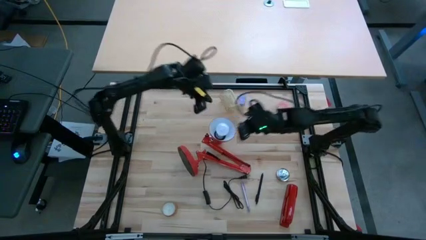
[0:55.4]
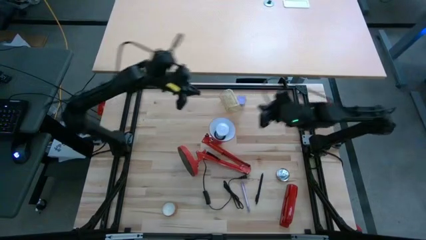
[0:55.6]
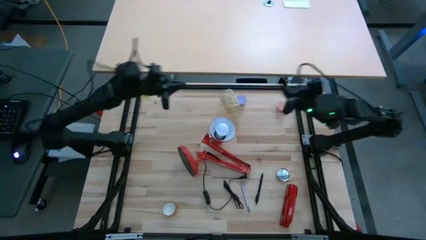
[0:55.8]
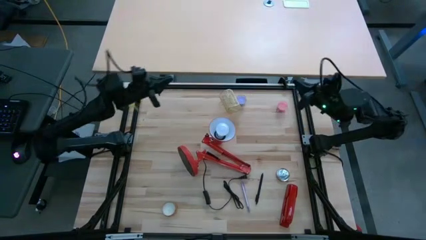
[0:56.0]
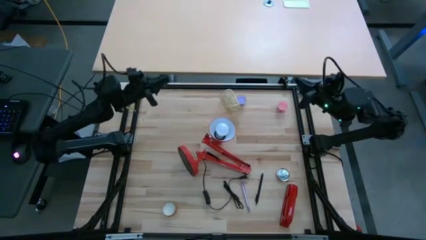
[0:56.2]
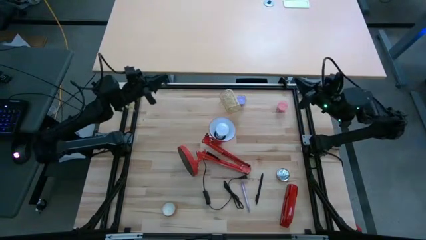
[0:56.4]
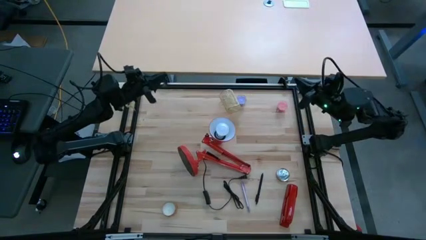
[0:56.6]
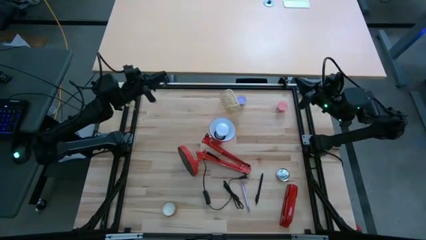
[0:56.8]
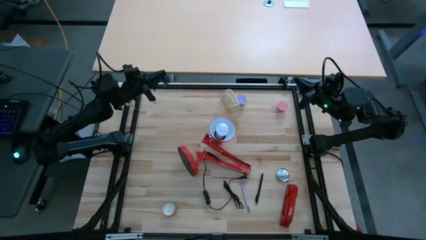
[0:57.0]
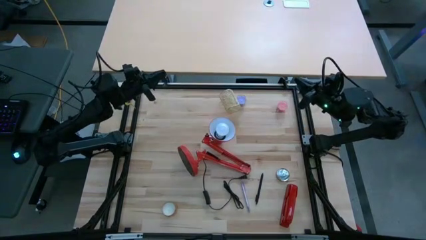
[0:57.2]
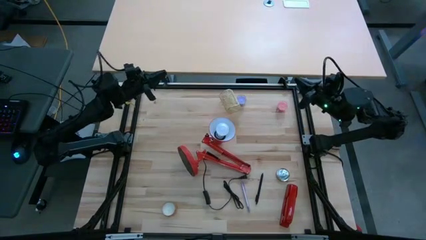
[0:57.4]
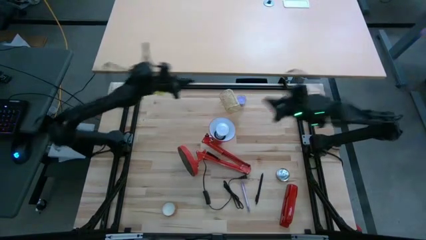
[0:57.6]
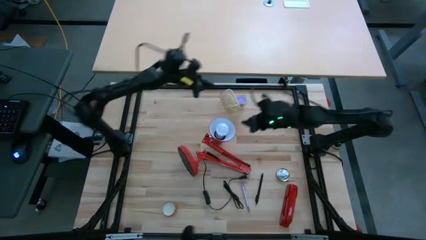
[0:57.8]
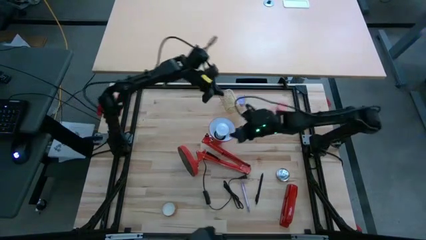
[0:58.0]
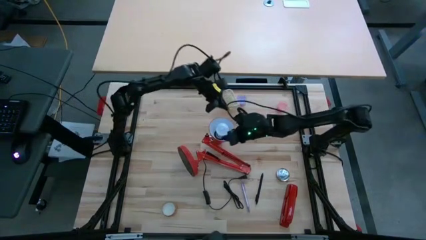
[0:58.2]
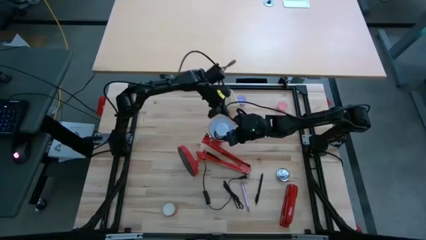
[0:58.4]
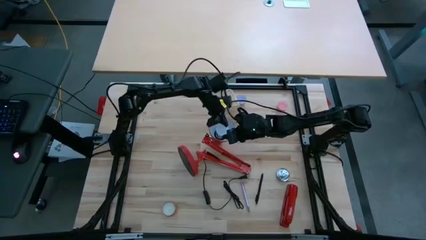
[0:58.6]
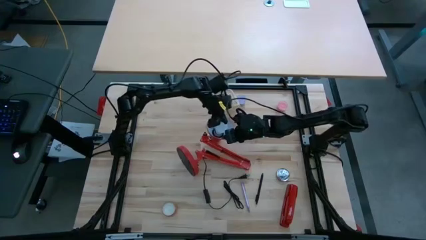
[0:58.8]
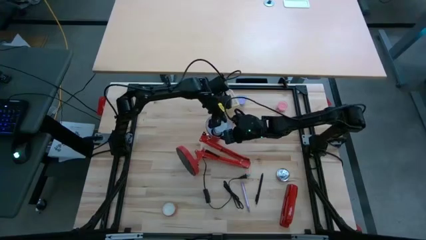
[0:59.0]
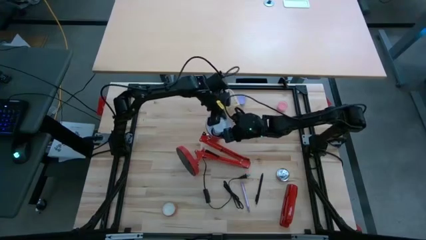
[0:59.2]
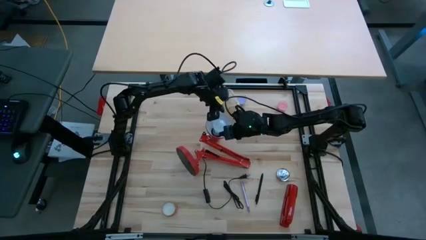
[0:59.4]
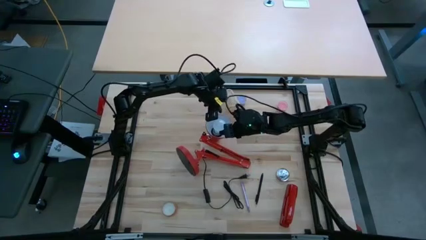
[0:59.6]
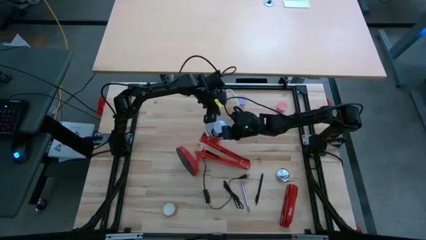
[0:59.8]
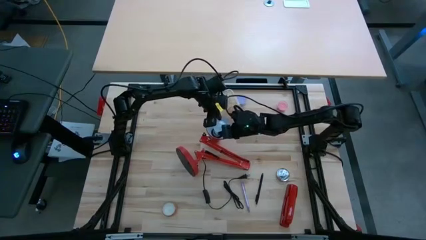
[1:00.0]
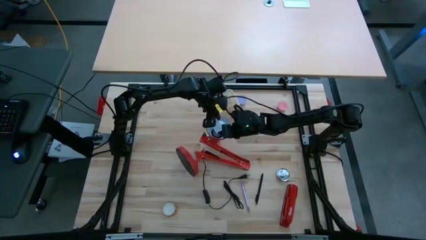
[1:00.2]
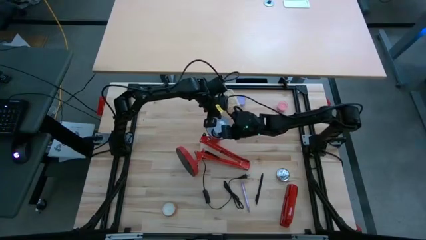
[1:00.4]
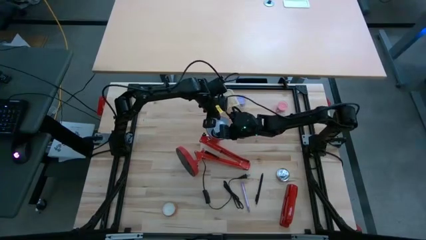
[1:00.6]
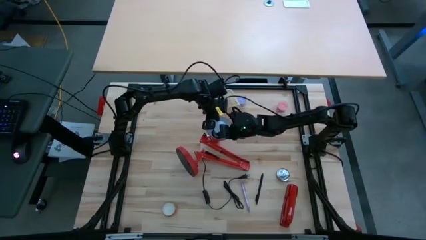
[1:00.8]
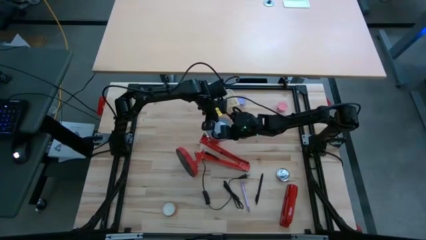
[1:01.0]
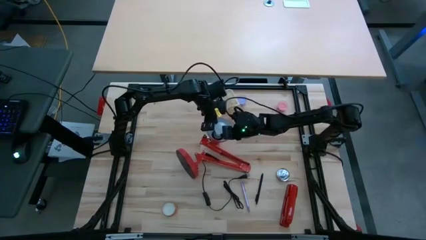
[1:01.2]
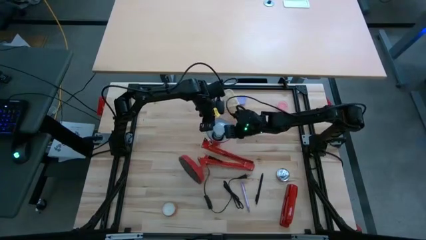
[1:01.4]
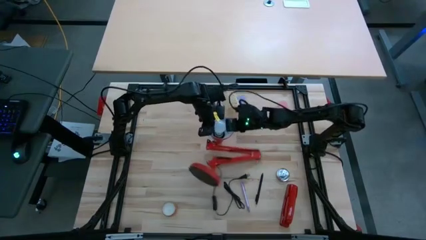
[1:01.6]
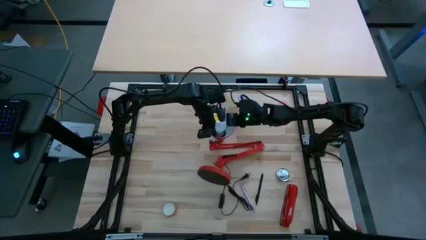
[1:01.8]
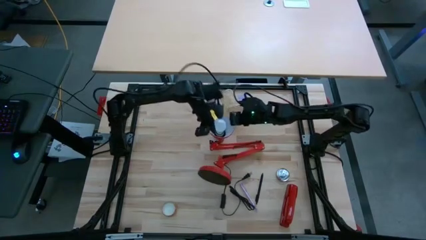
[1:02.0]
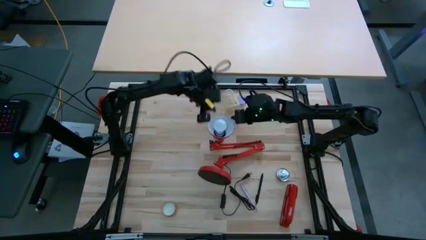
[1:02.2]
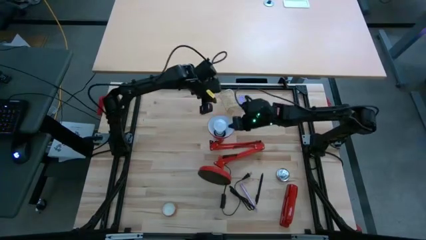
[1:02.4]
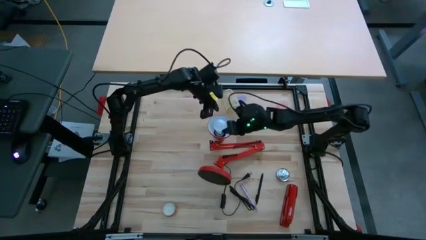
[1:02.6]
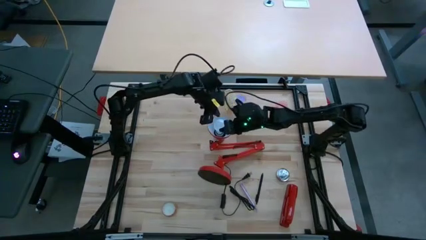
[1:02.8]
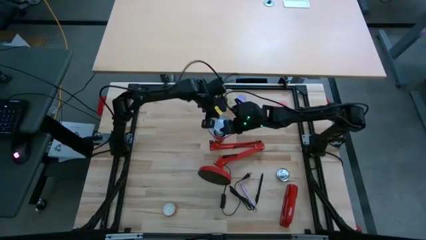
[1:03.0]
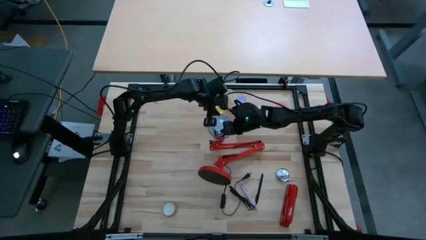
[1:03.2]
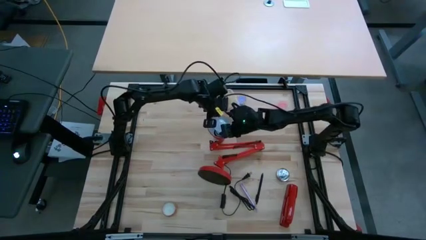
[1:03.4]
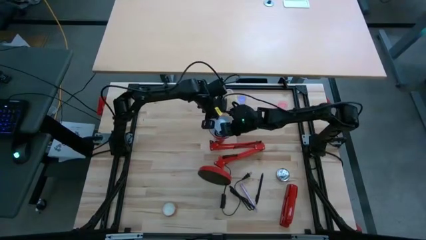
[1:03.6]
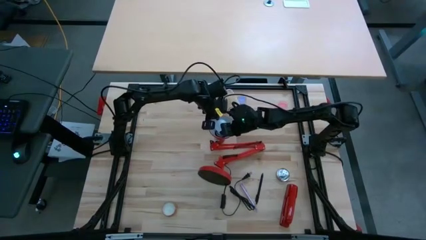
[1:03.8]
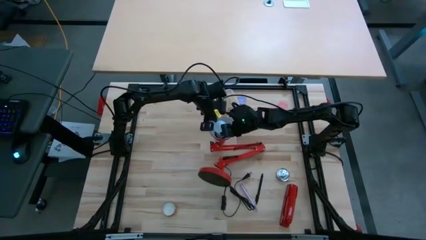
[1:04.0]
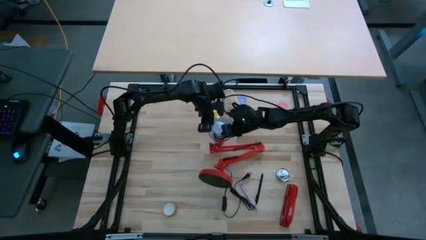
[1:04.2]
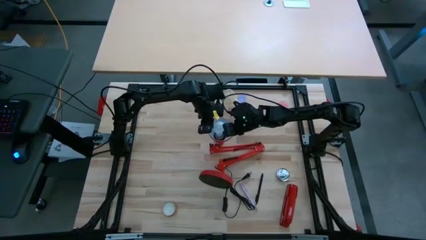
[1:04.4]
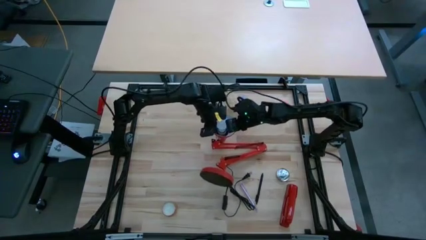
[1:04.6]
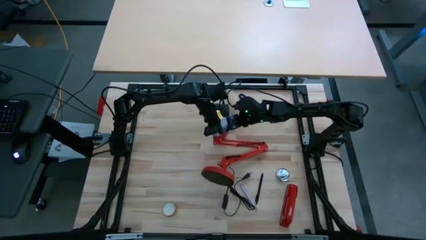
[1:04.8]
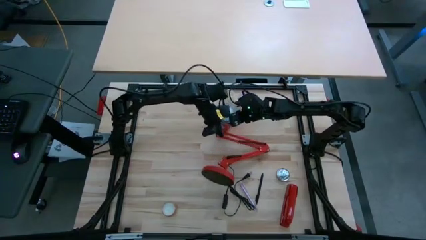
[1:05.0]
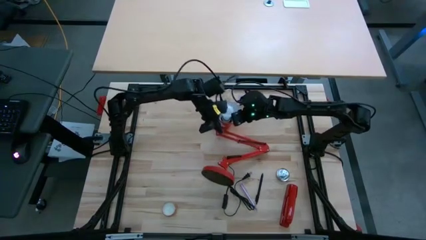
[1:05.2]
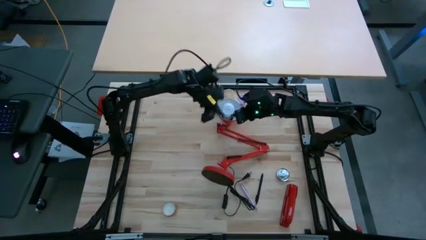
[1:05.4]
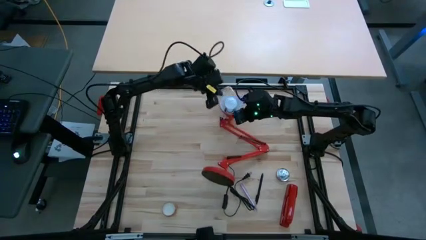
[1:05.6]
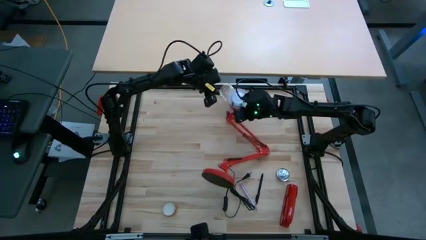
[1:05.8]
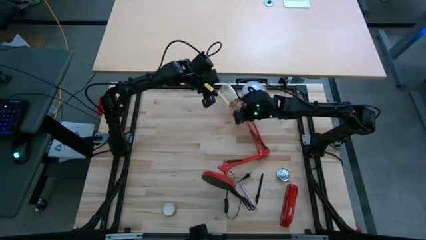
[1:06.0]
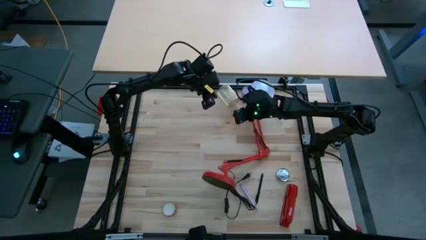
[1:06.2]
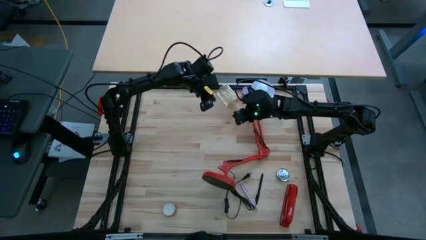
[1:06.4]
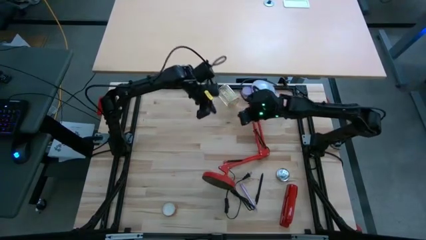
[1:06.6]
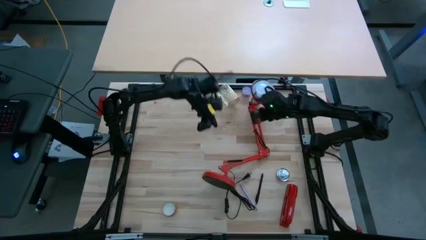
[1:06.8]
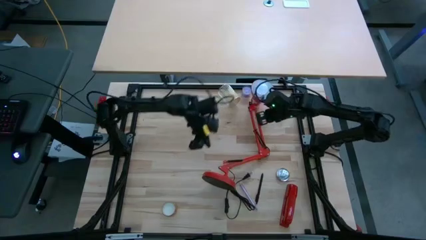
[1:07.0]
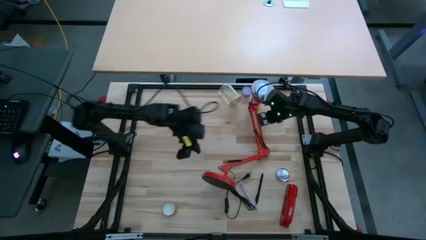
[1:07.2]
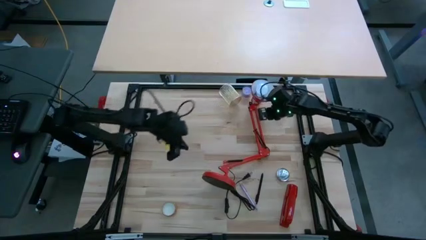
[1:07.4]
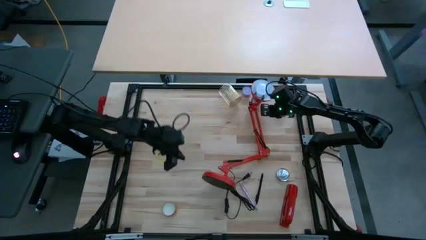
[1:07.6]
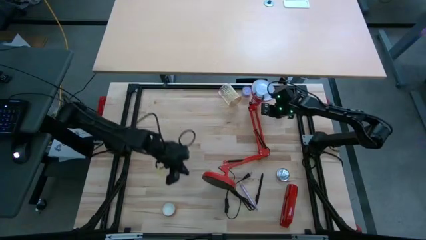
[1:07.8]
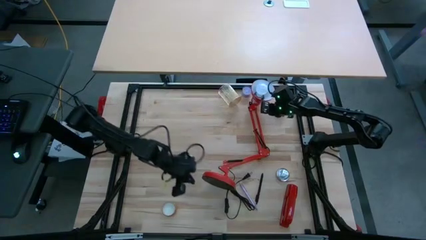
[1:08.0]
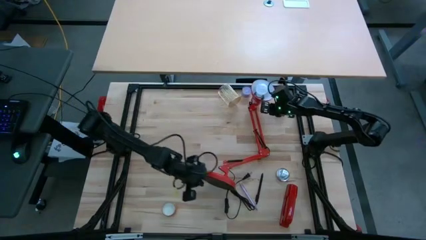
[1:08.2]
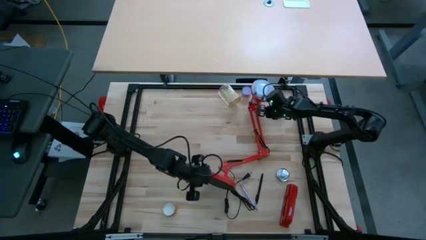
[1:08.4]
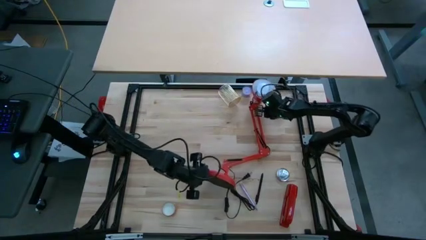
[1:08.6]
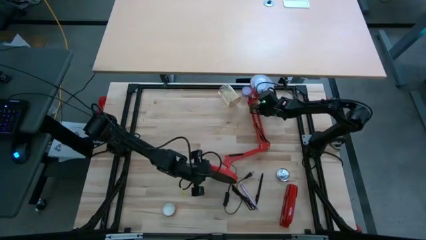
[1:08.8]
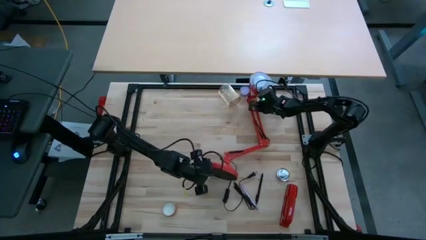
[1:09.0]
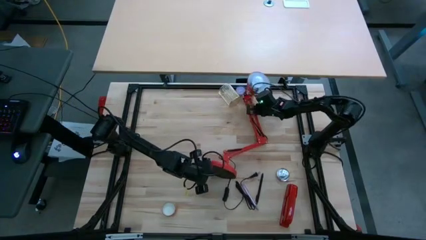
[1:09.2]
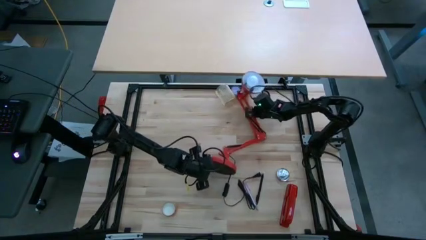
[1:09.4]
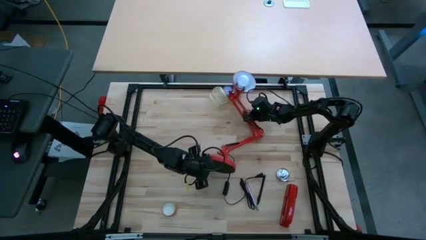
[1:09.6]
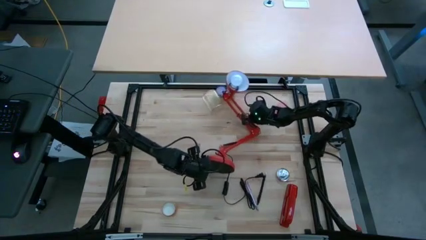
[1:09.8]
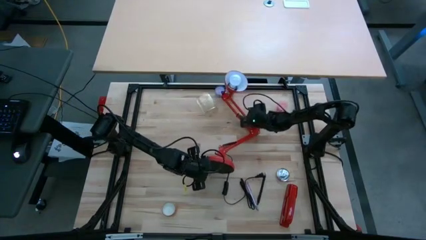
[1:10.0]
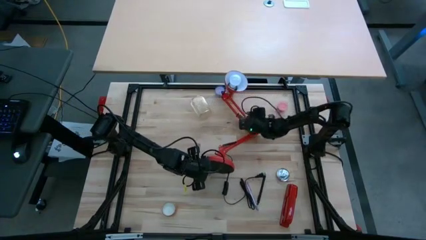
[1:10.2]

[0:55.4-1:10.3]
Task: Screw lightbulb
Remove the white lightbulb from the desk lamp

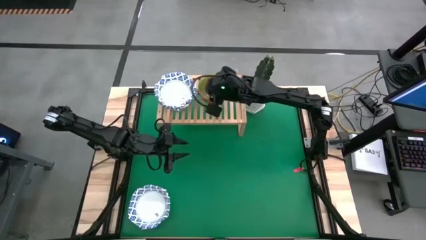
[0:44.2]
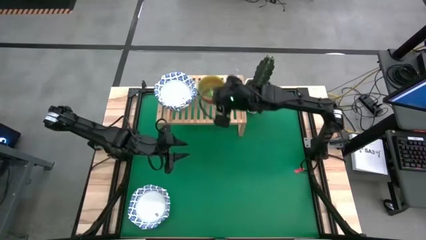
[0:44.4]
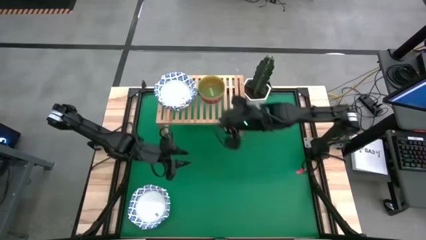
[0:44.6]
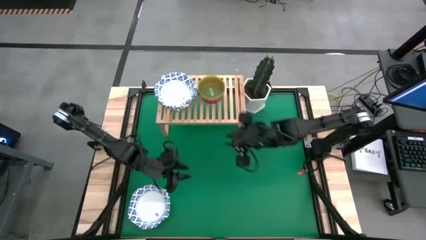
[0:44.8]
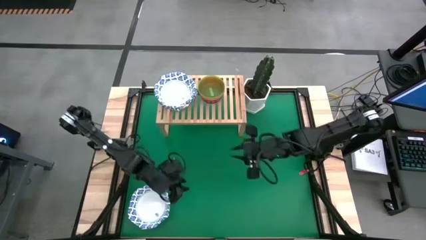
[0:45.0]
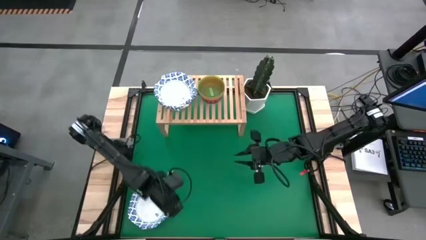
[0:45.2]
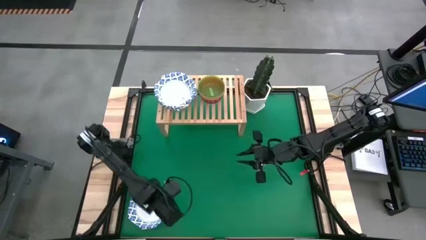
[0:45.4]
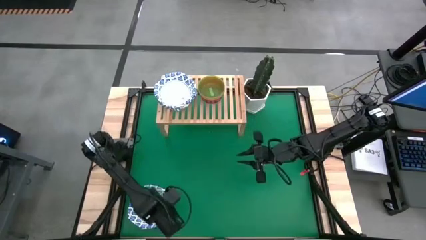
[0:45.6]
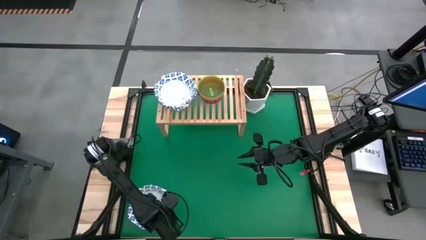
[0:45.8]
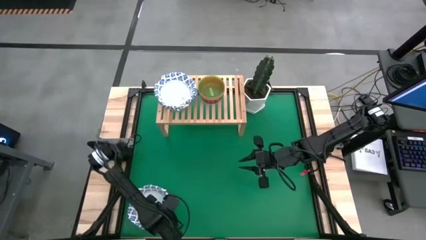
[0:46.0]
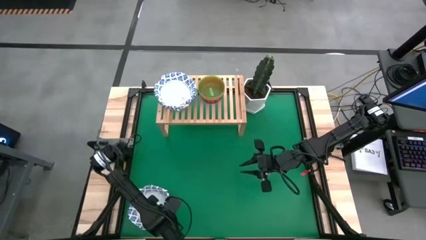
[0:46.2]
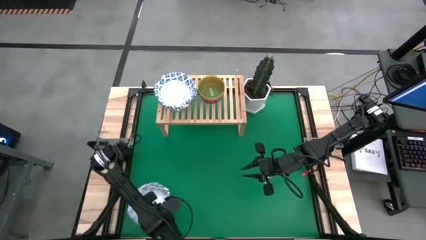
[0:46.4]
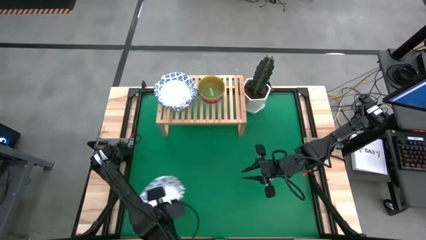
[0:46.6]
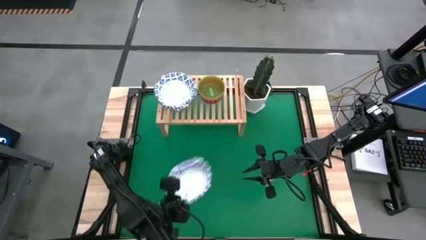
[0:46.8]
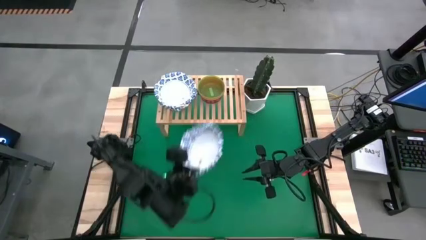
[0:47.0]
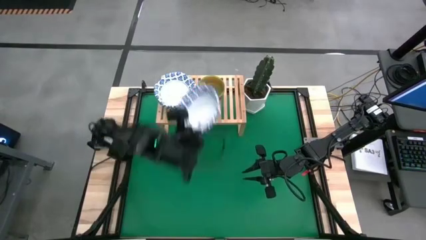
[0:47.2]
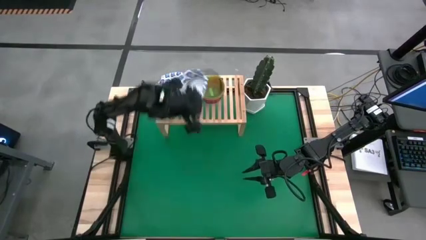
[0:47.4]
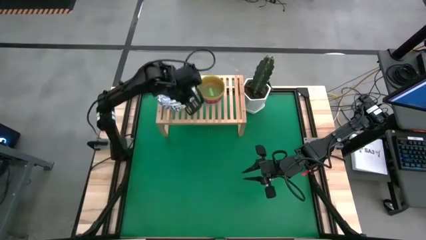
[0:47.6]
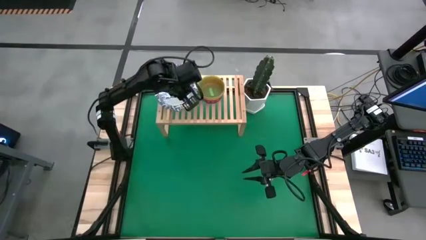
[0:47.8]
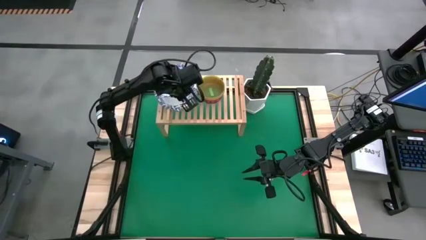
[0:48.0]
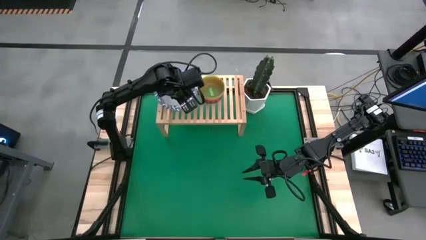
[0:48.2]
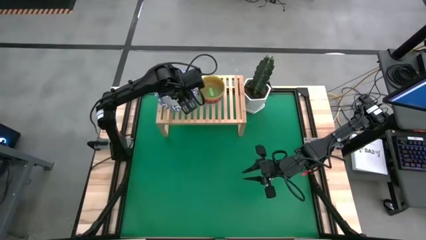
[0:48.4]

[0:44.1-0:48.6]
Task: Place and stack bowls onto a shelf
Stack the blue patterned bowl on top of the blue patterned bowl on the shelf
